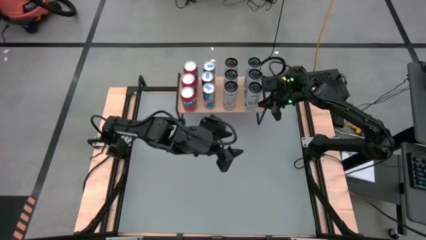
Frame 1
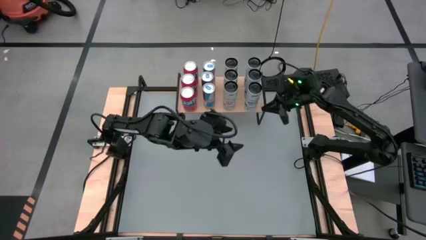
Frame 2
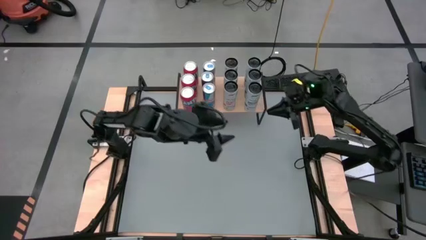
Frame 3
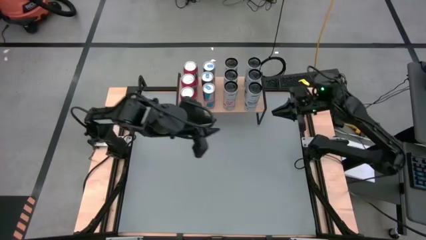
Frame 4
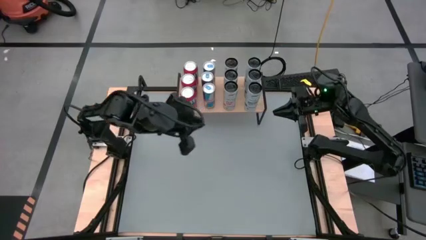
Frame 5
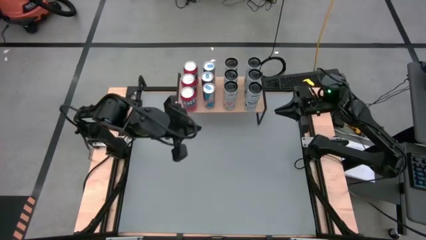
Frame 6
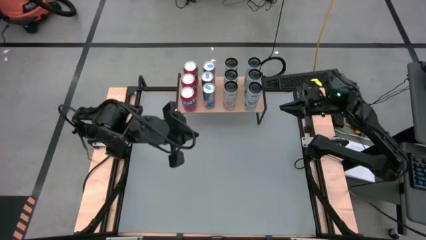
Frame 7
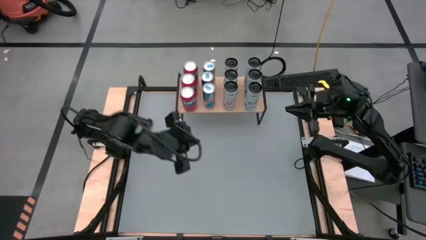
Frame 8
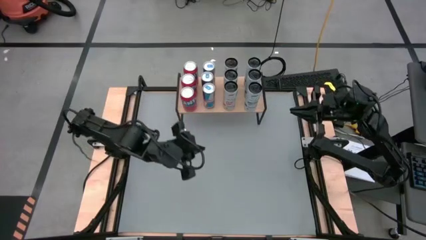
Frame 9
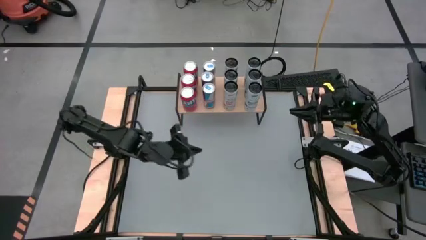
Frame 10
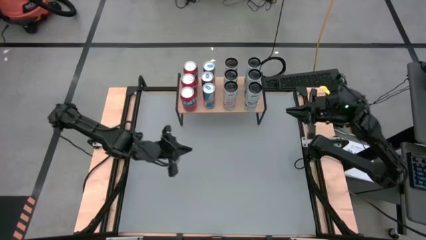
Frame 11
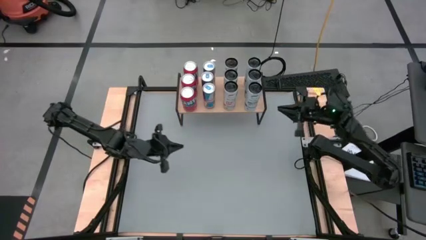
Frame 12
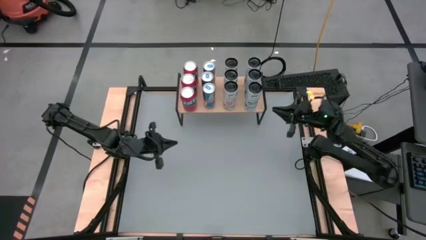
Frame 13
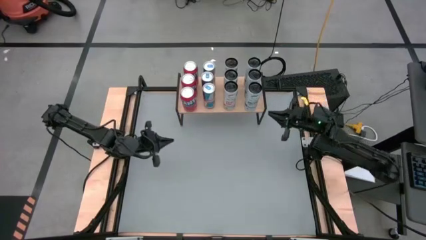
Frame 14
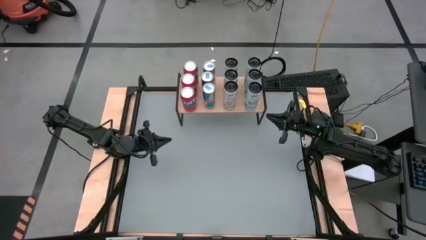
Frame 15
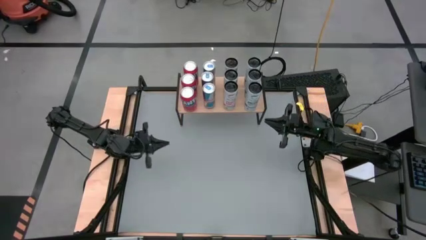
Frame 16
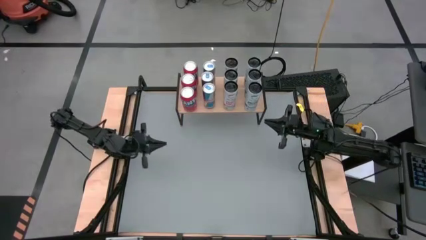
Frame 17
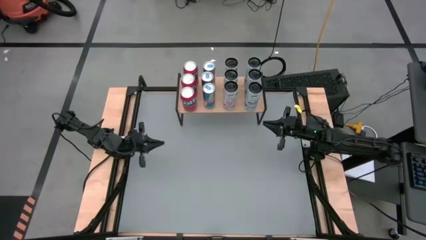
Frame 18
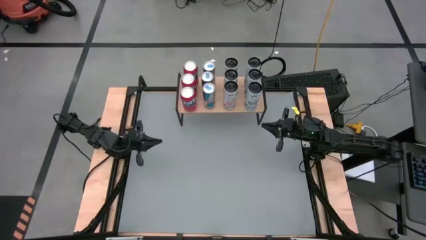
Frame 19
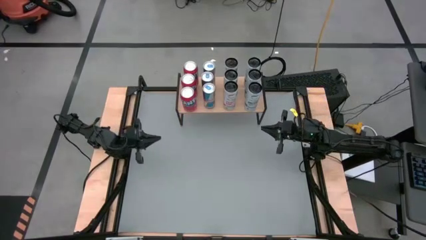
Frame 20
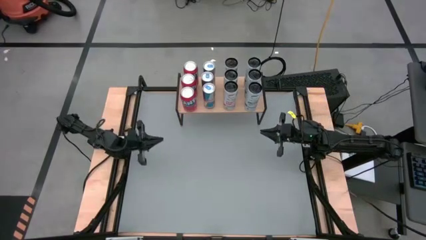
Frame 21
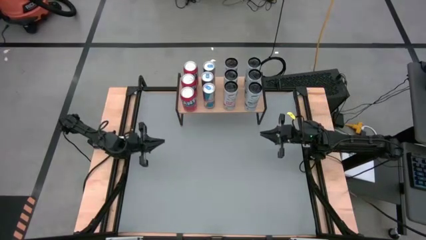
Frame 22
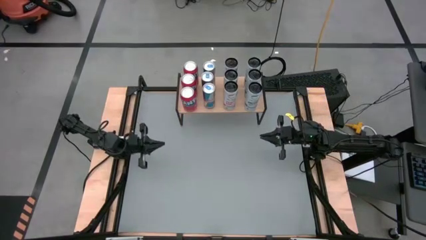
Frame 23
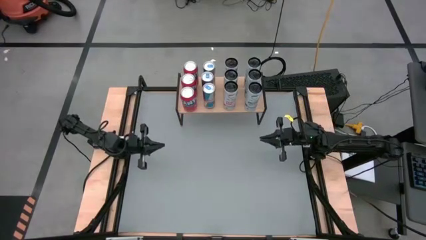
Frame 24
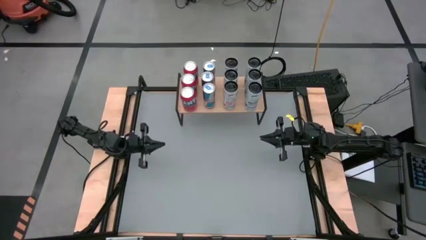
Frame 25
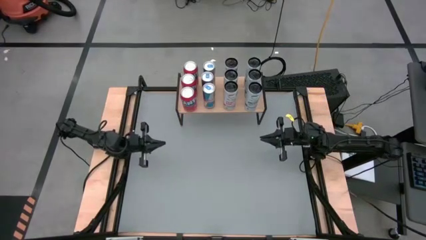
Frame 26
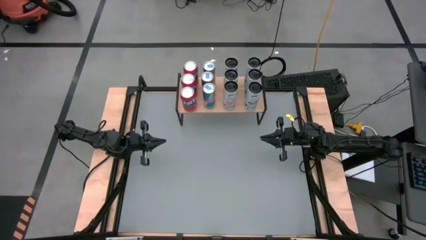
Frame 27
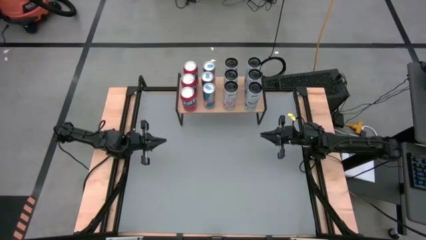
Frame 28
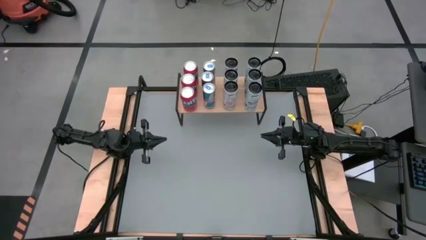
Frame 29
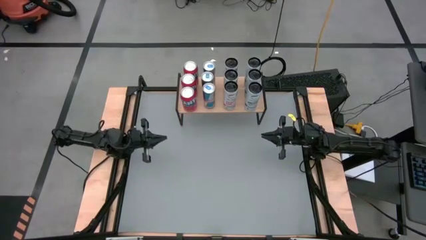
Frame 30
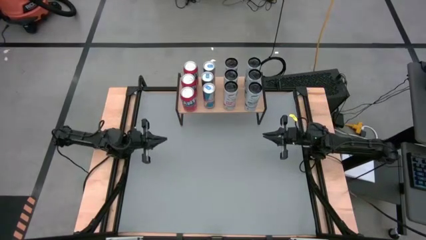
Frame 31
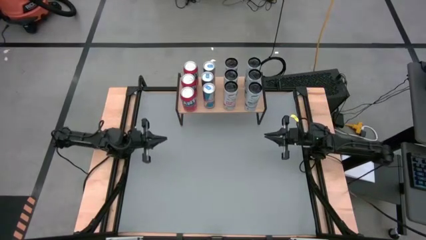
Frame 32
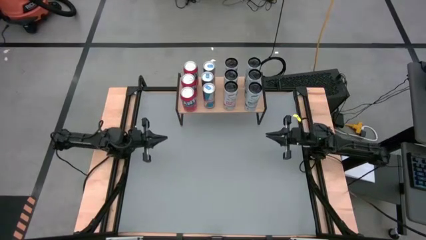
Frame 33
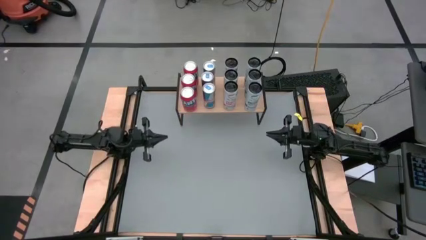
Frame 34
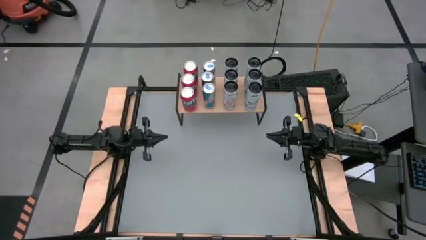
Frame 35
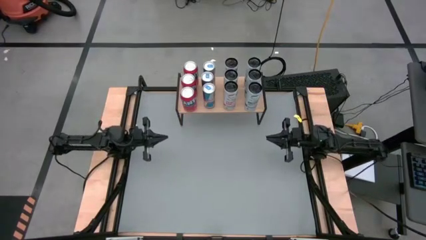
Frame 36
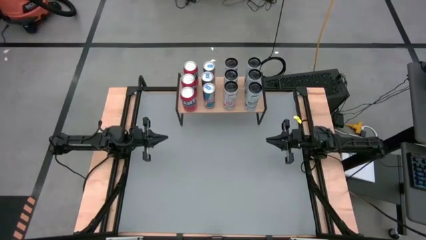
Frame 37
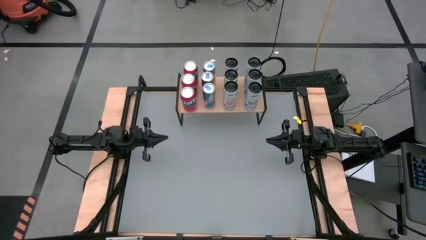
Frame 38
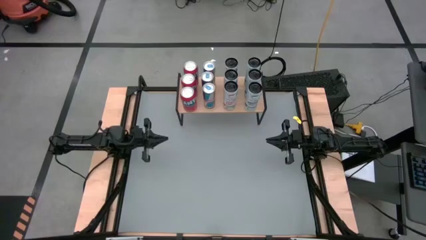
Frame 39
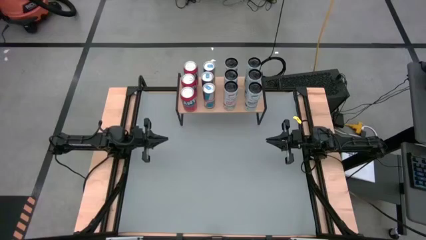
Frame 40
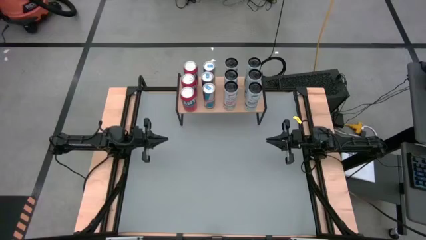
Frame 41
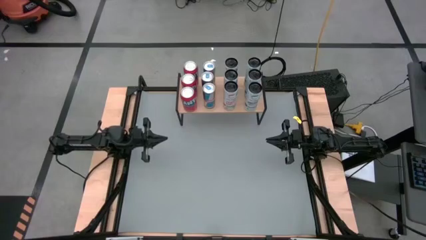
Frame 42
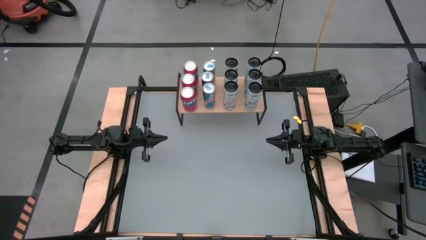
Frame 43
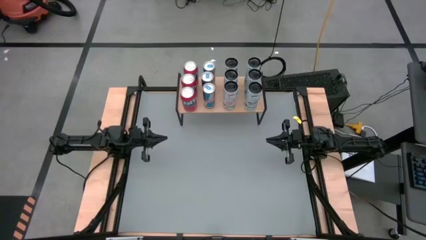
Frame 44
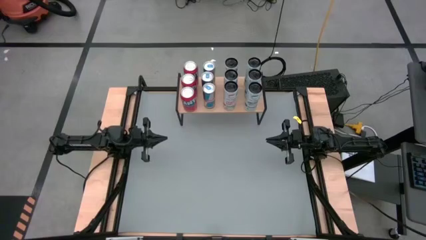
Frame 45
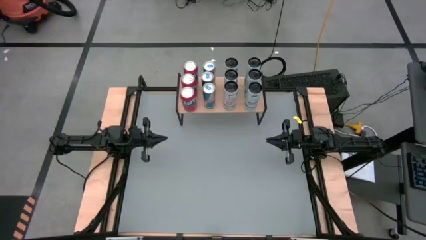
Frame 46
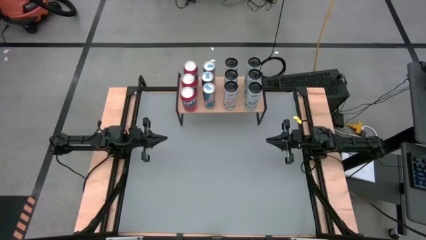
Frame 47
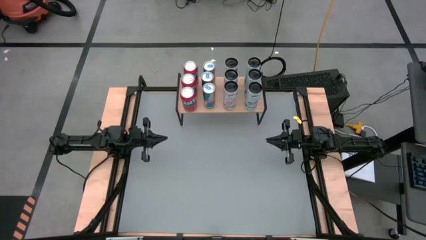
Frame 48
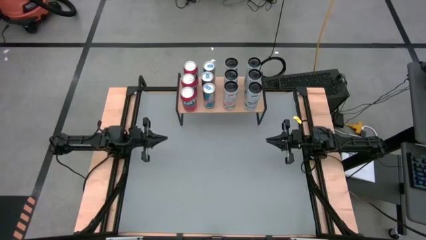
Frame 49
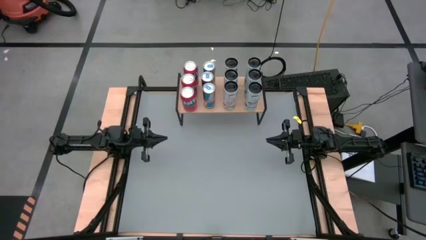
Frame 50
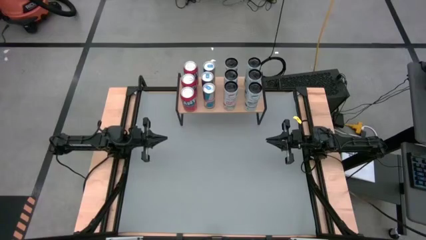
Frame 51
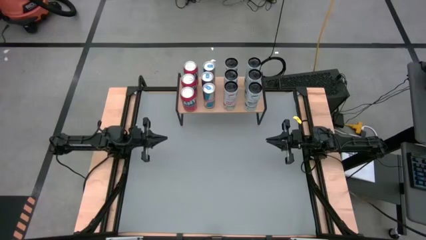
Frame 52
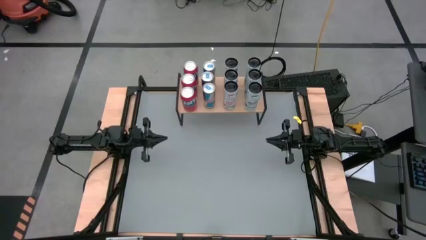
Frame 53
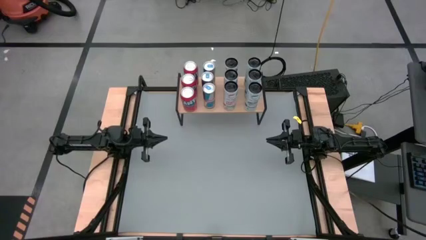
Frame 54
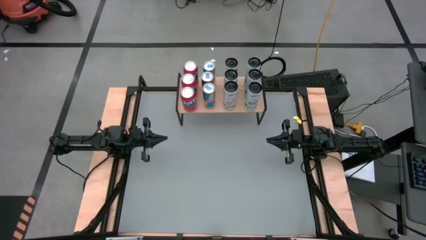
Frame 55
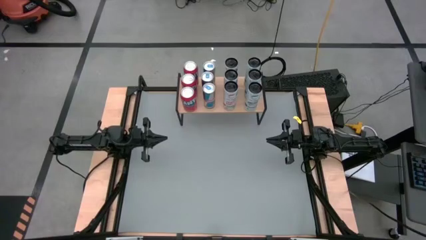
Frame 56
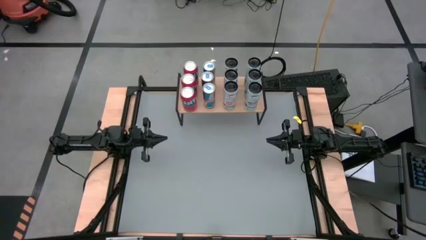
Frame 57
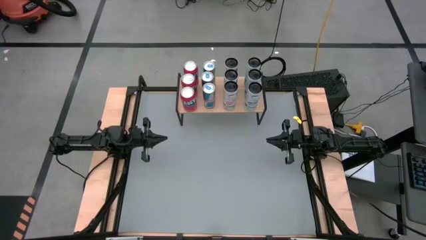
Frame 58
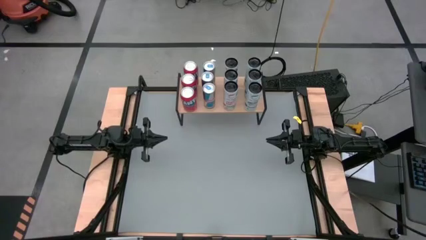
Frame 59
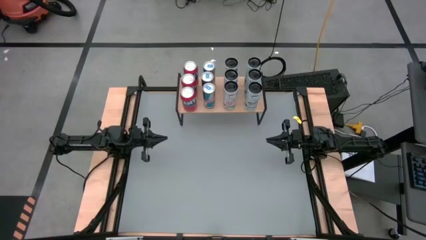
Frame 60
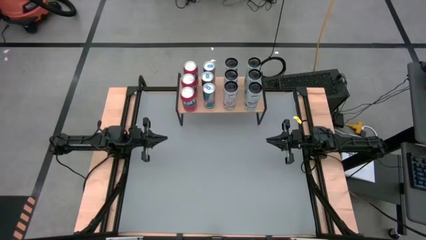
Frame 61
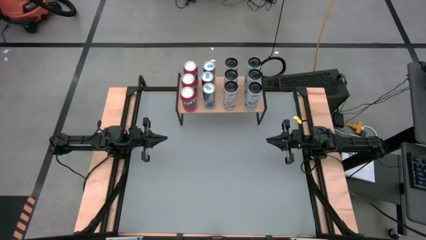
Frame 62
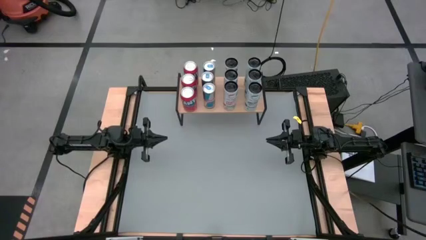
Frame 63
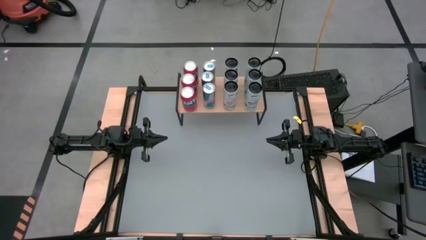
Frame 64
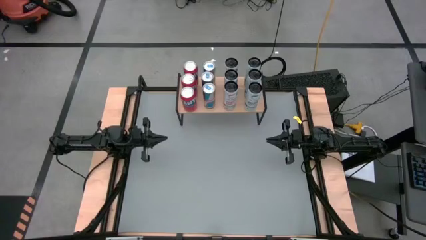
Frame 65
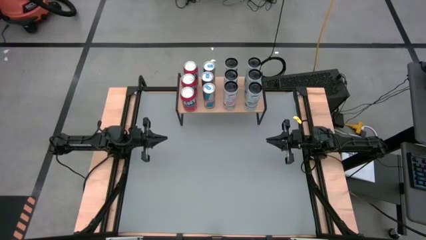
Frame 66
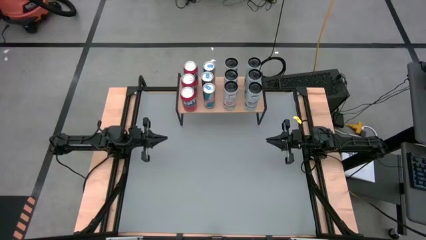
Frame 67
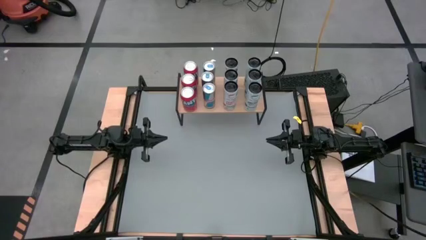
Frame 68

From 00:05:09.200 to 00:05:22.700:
Task: Place canned beverage on shelf
Return to Home Position

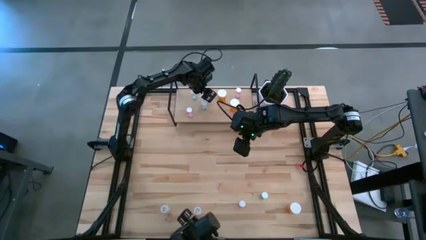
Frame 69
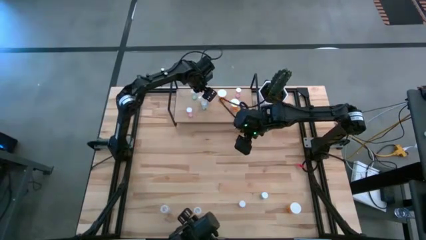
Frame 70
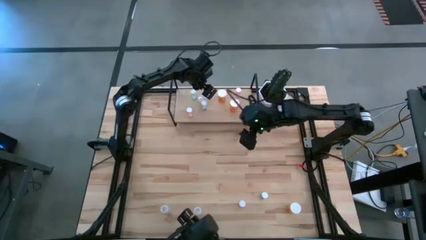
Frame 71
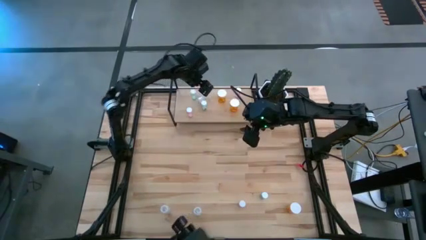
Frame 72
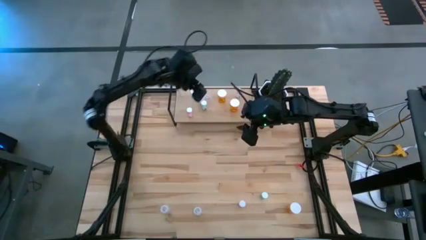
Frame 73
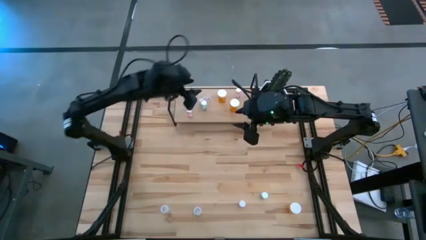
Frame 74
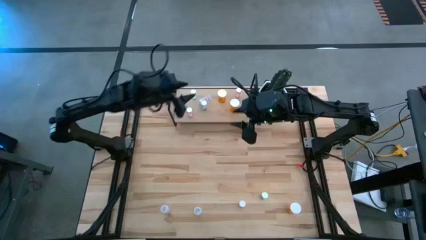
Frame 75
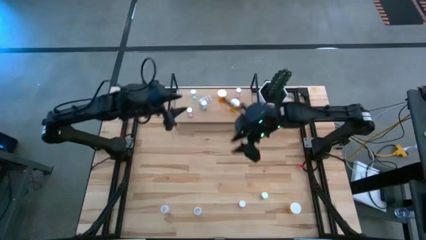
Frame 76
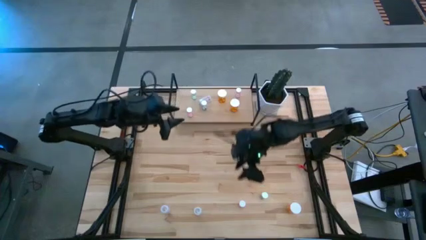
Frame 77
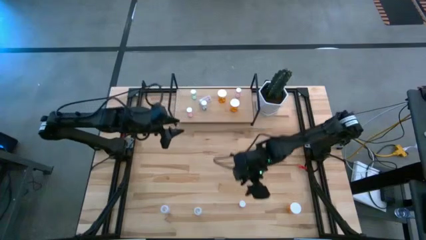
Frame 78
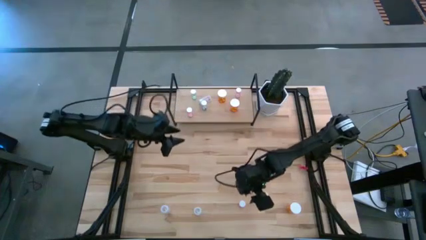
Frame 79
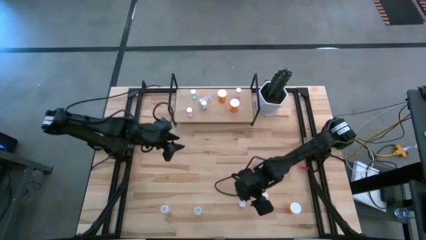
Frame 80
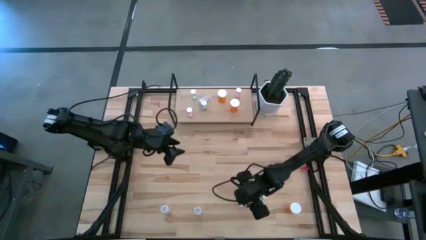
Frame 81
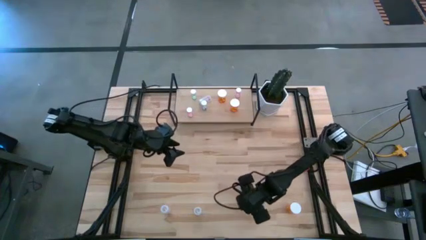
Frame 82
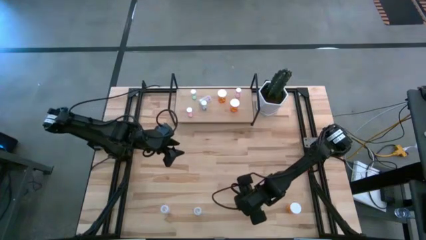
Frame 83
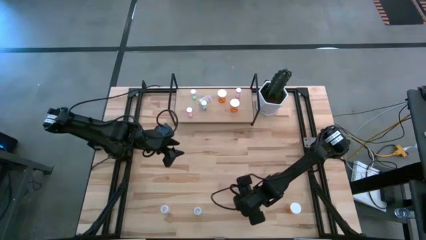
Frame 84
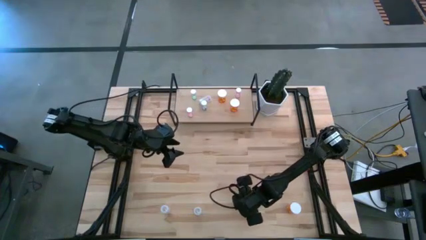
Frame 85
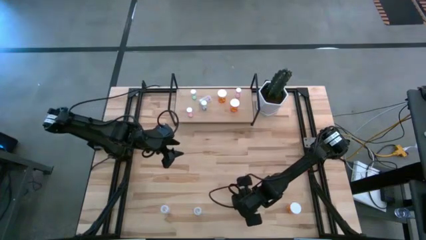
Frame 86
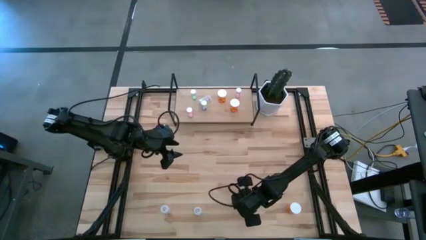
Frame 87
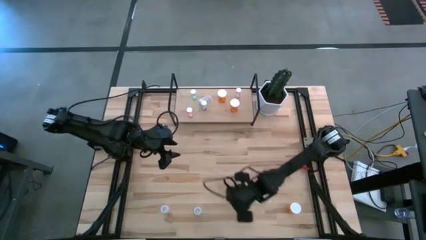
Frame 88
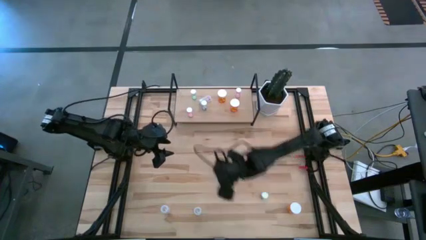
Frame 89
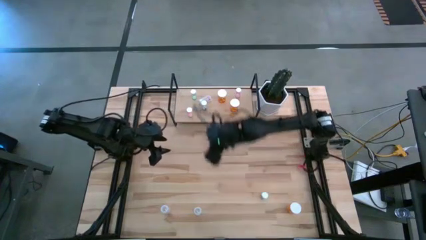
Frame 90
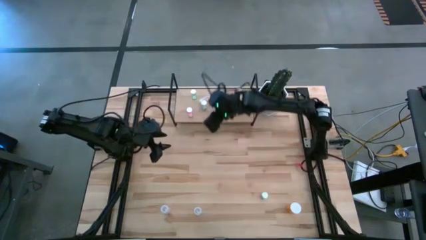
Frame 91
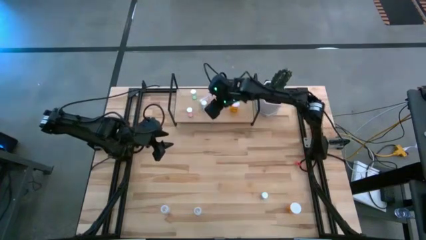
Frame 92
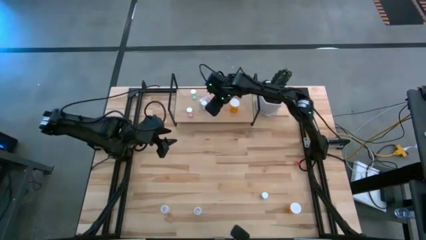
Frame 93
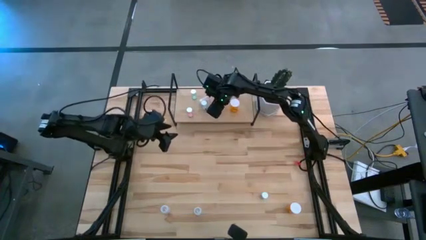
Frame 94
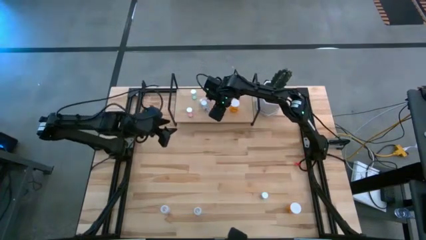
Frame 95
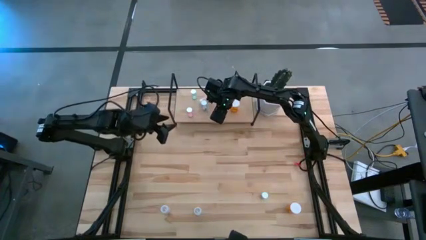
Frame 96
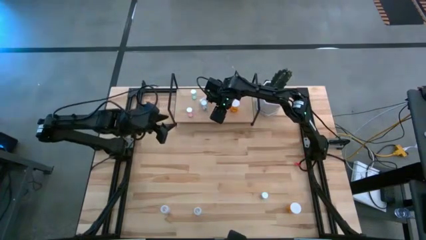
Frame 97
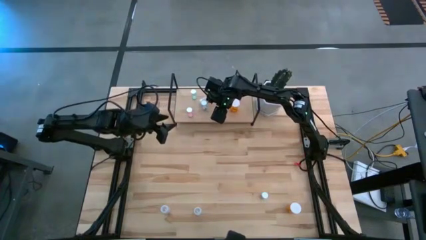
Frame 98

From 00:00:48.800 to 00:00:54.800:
Task: Pick and place medicine bottles onto shelf by color
Put the pink pill bottle on the shelf
